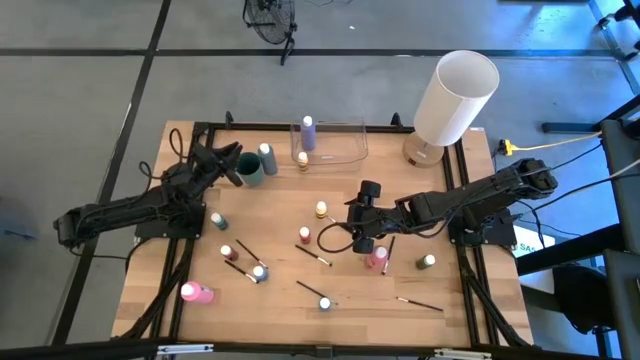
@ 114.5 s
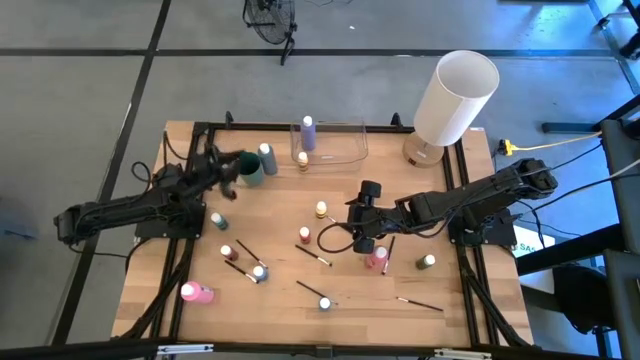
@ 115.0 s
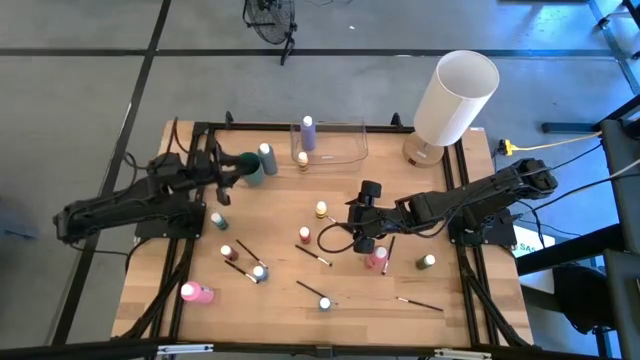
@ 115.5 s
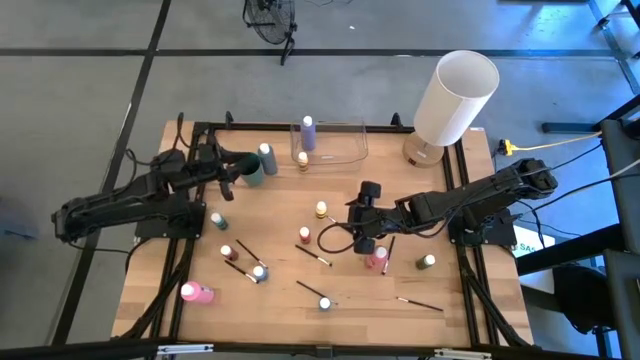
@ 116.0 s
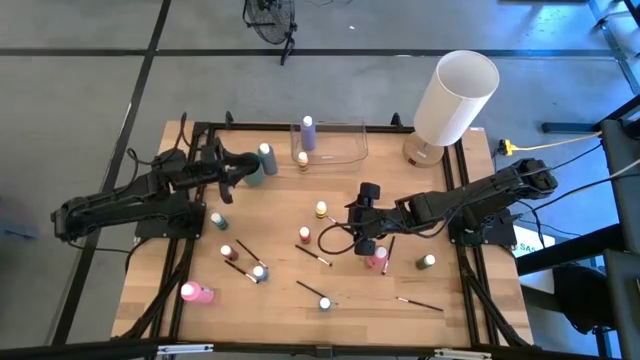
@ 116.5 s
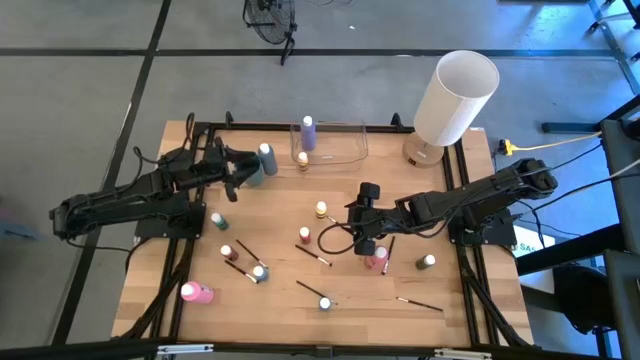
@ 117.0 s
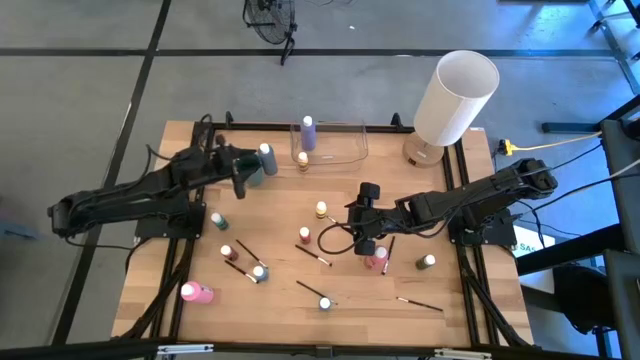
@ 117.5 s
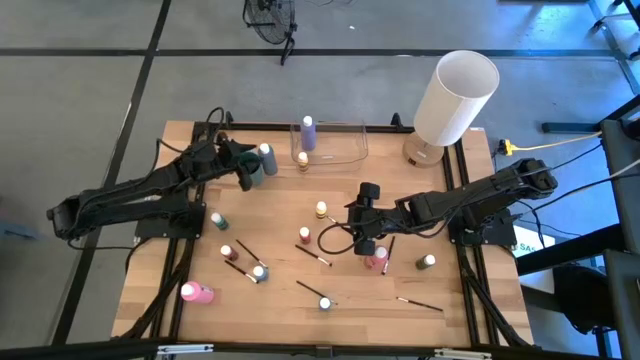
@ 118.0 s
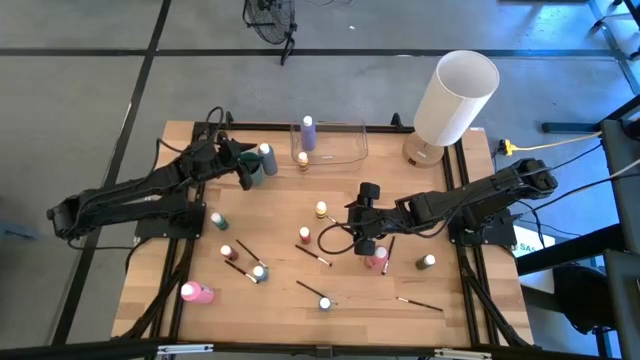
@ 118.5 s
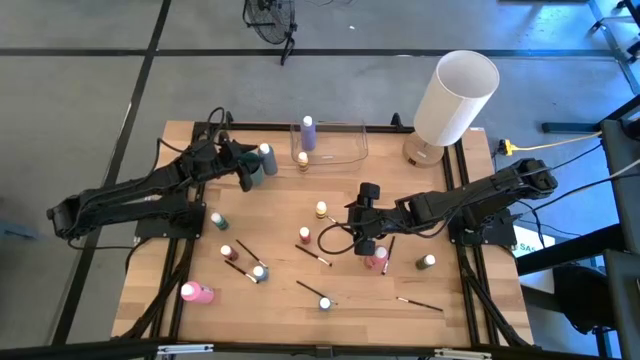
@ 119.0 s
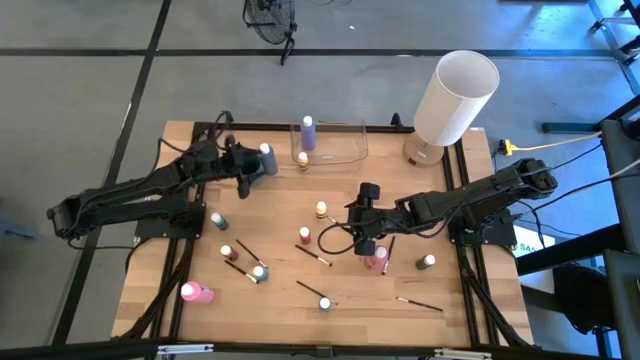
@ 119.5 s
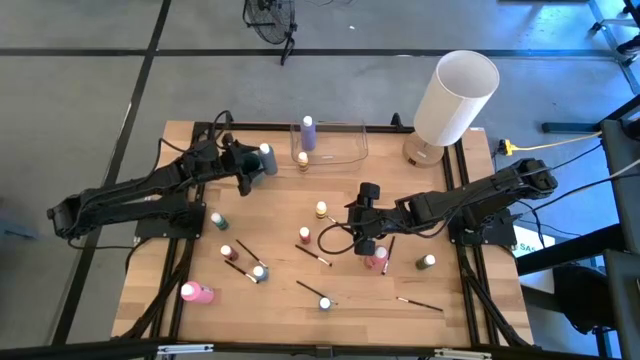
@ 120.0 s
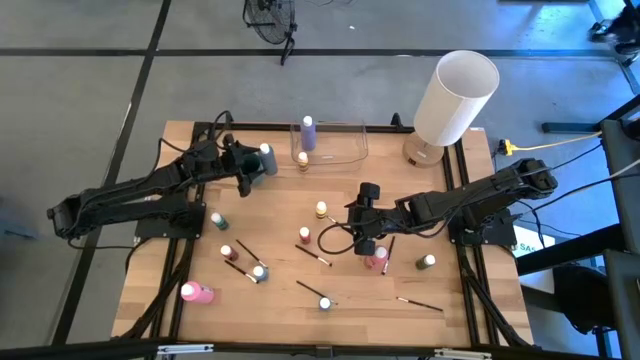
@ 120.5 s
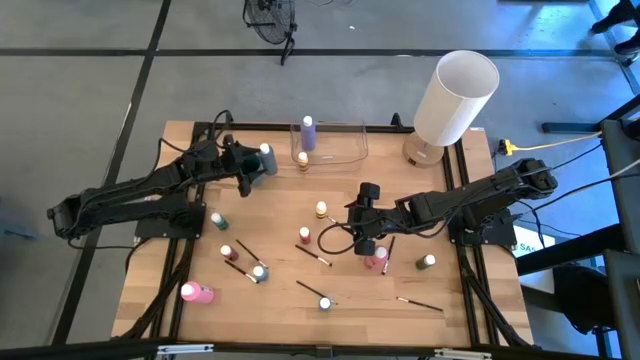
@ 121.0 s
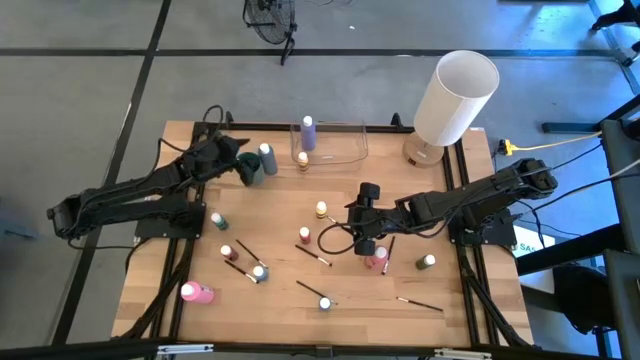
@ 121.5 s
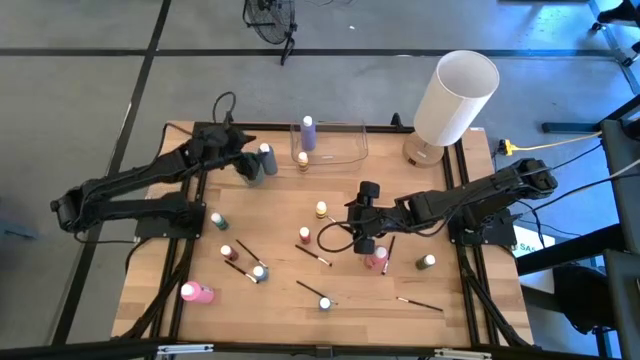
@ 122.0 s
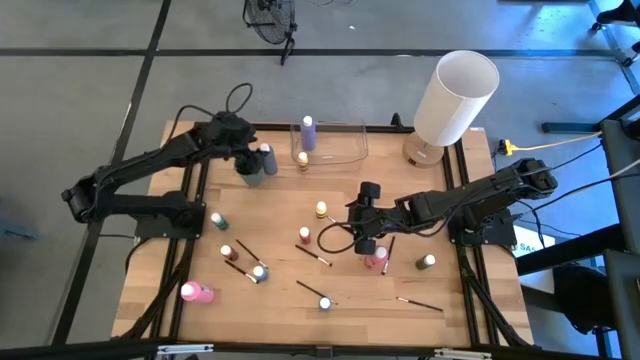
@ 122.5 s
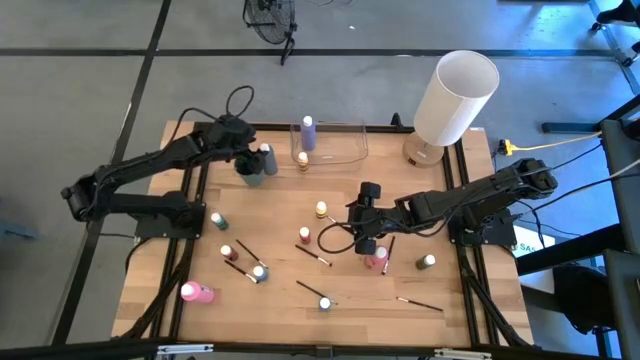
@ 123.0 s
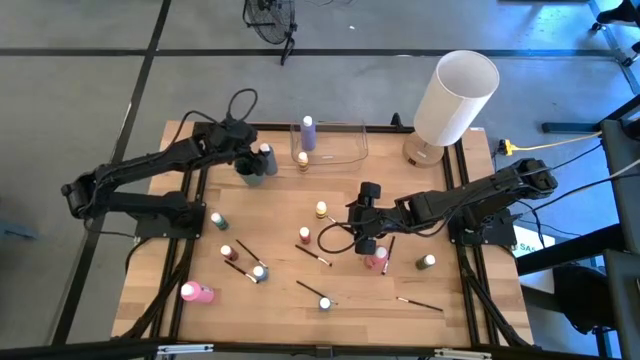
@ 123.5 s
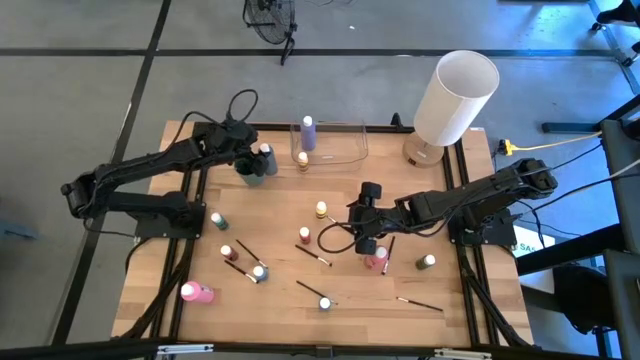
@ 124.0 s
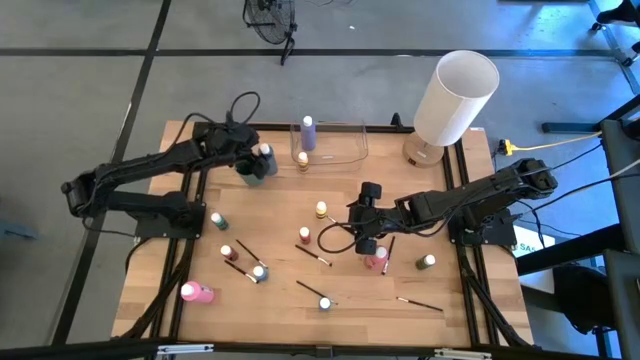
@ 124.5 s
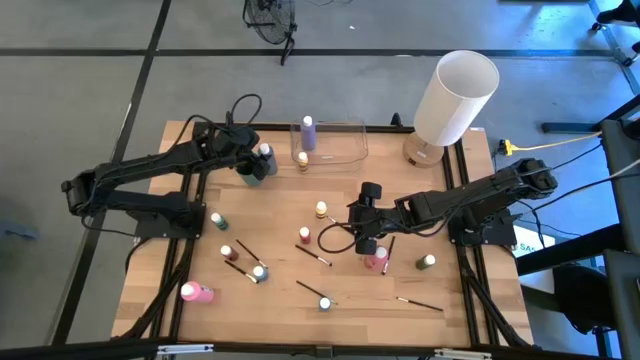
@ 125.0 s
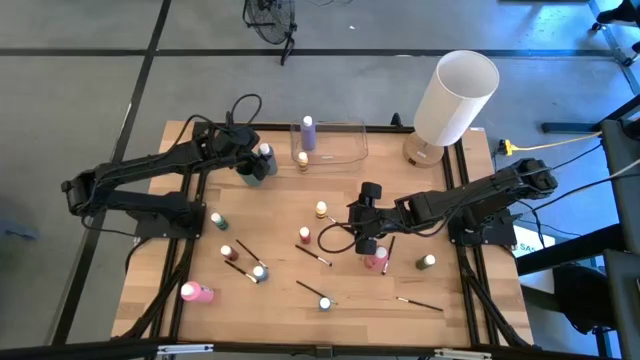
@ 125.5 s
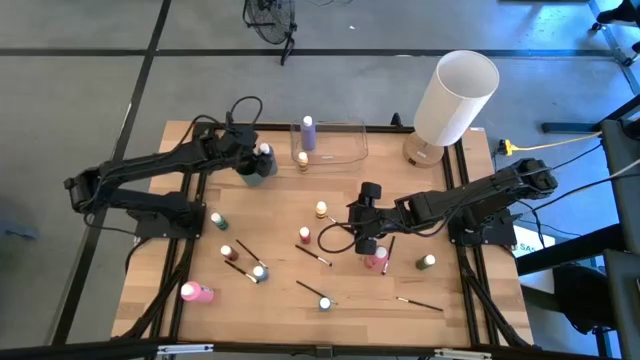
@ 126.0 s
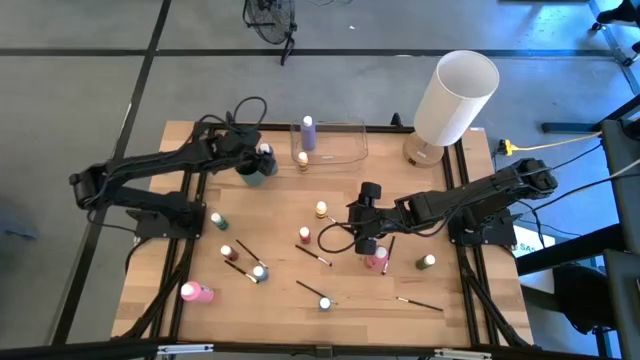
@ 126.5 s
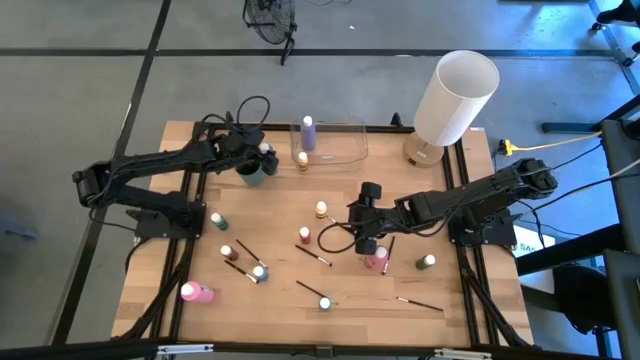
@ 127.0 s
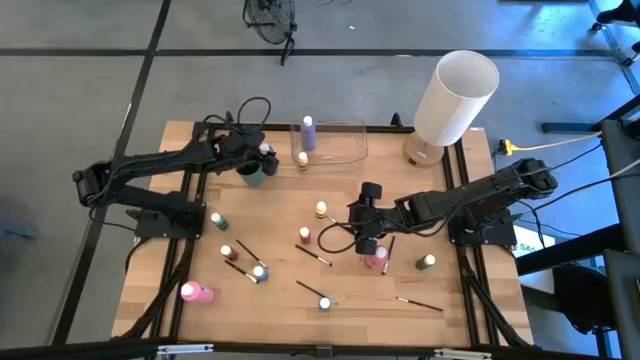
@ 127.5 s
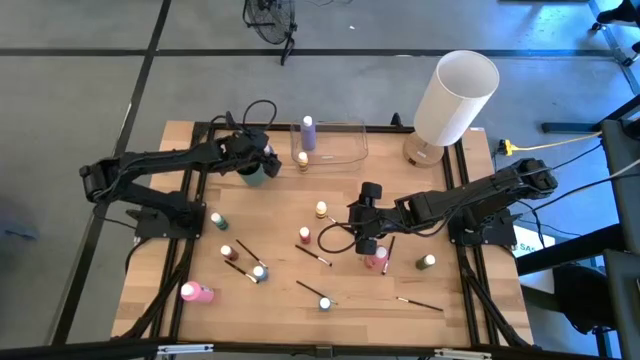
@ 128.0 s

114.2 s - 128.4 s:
Task: Pick & Place Paint Supplies
Put the gray paint bottle into the transparent bin

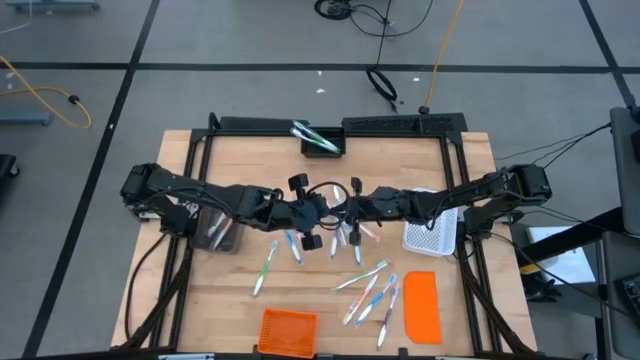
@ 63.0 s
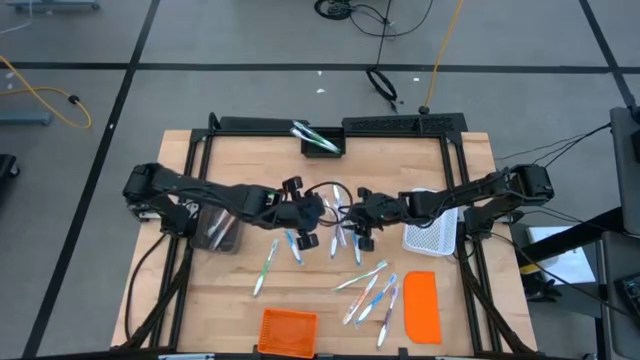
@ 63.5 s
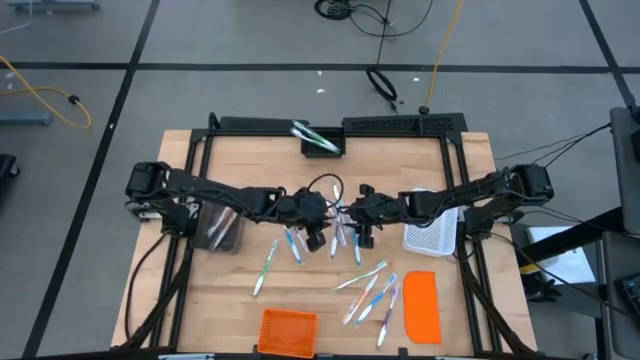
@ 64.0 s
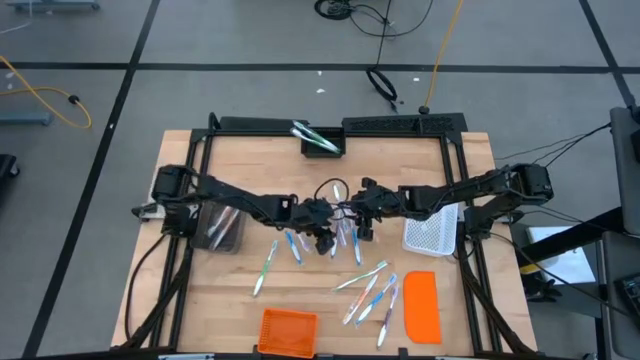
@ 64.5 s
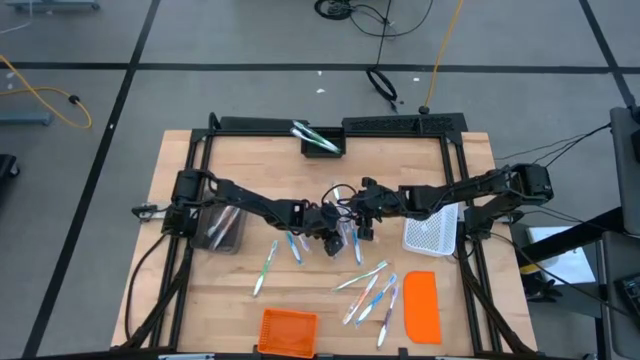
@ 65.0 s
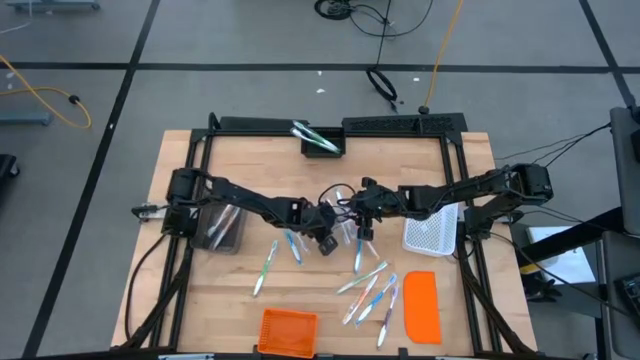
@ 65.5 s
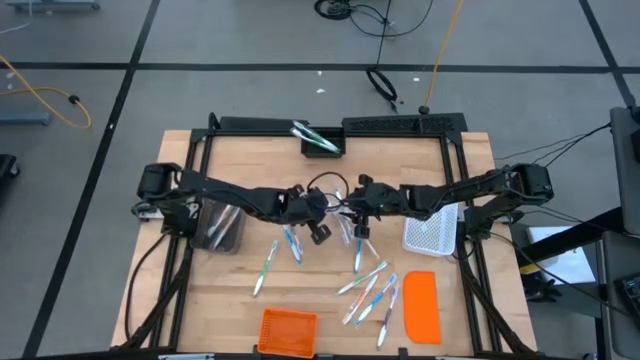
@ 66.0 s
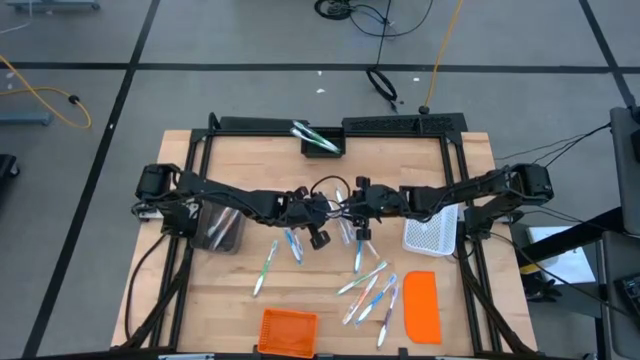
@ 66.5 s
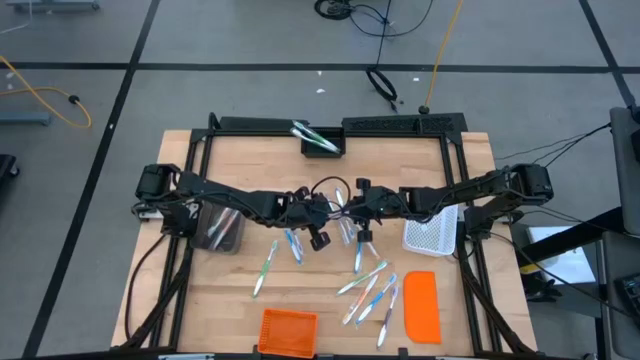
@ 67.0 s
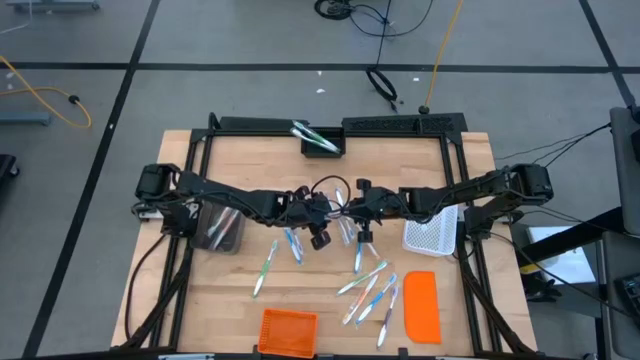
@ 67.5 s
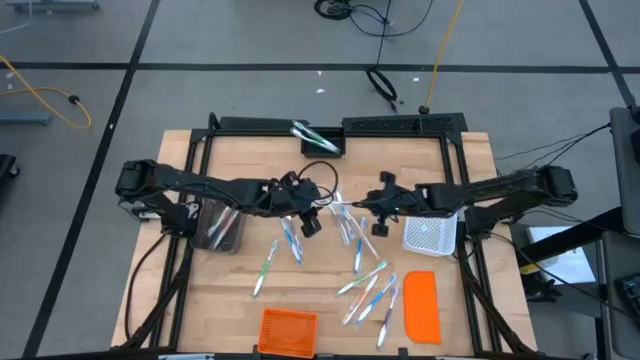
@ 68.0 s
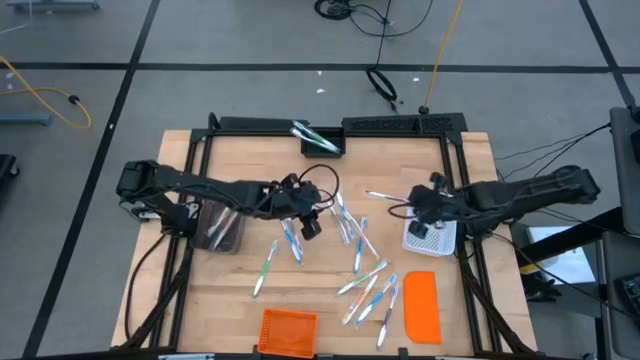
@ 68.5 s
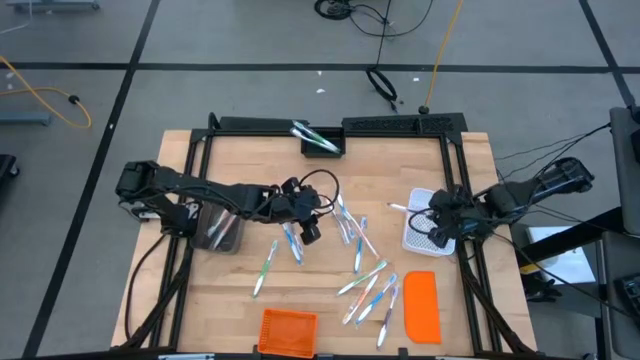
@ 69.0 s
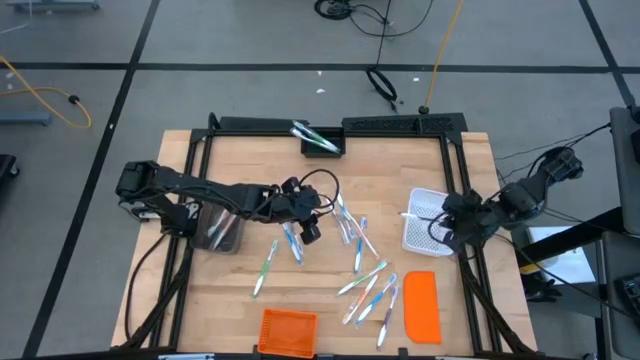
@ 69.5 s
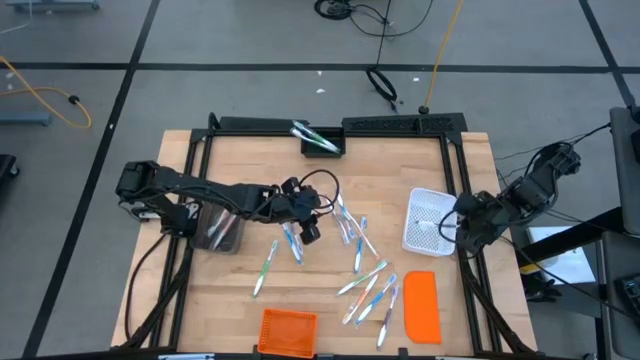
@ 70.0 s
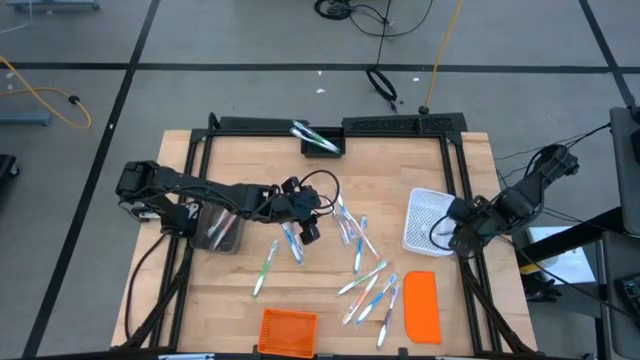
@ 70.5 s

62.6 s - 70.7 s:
Task: Pick & Place Toothbrushes
Put the purple toothbrush into the white bin
